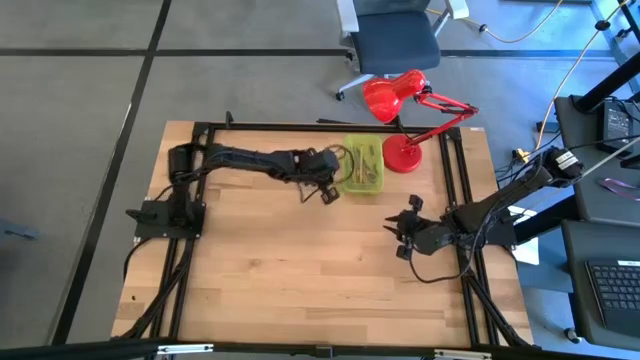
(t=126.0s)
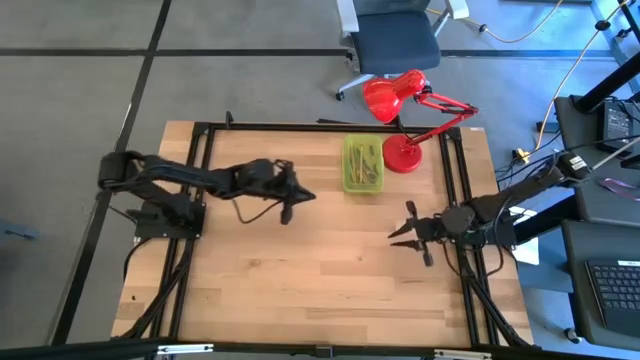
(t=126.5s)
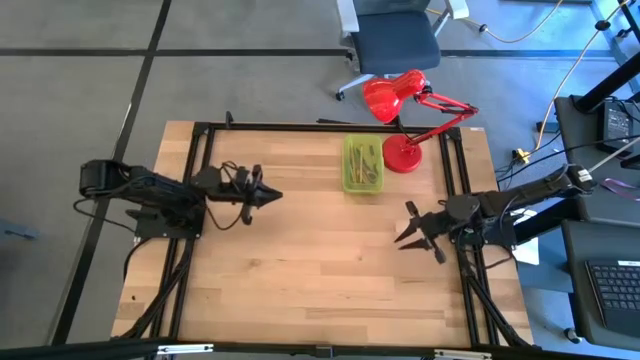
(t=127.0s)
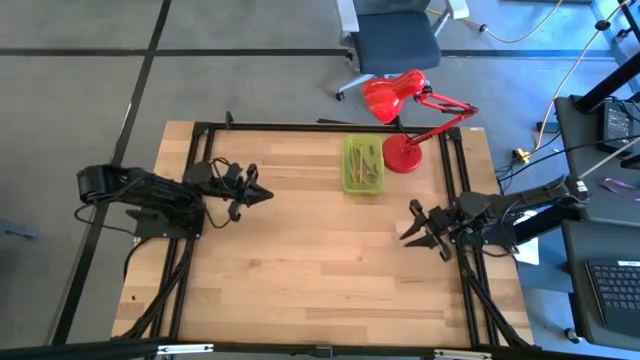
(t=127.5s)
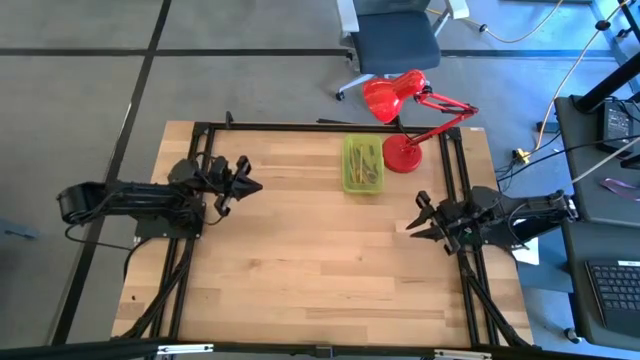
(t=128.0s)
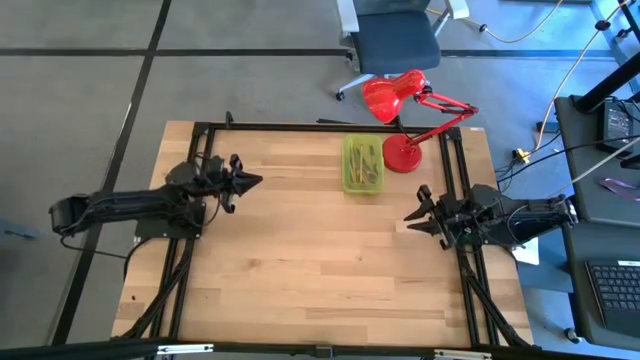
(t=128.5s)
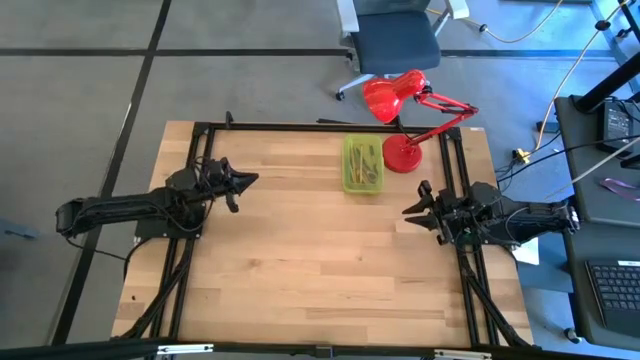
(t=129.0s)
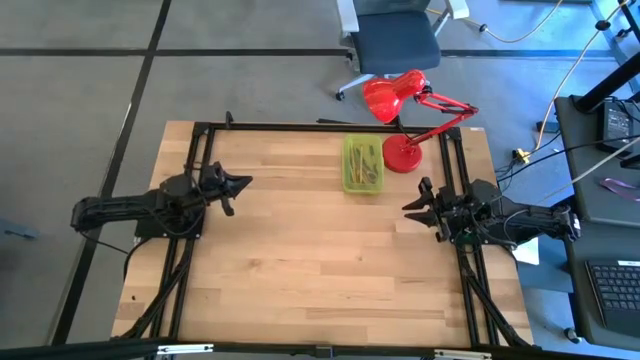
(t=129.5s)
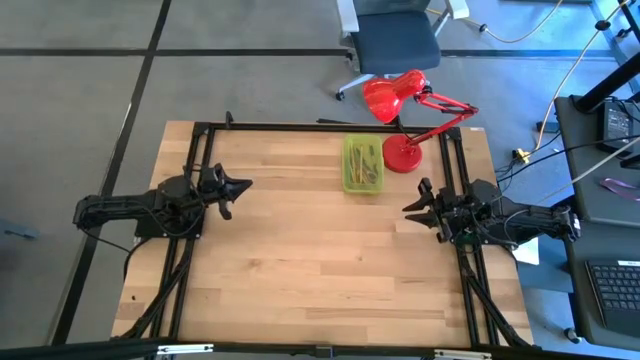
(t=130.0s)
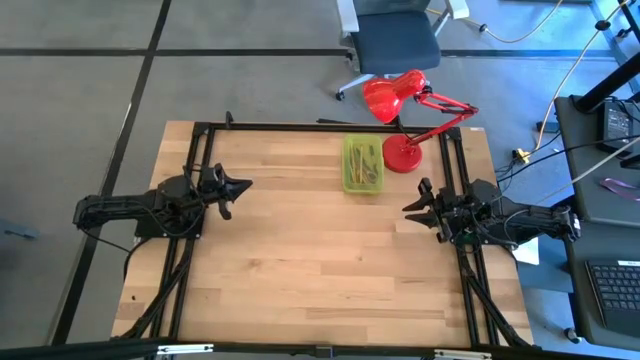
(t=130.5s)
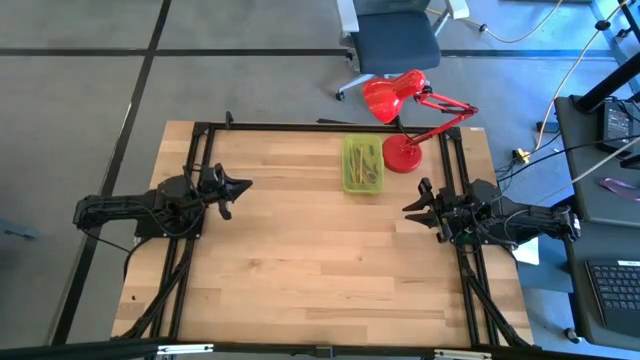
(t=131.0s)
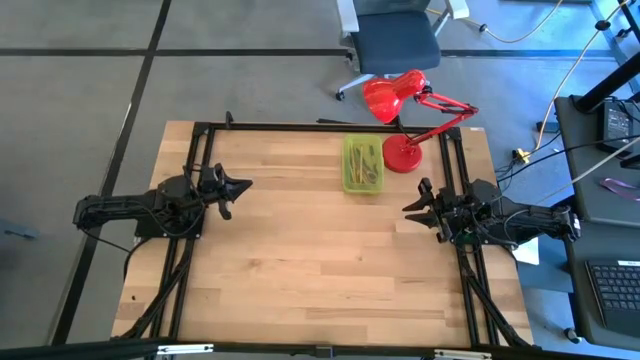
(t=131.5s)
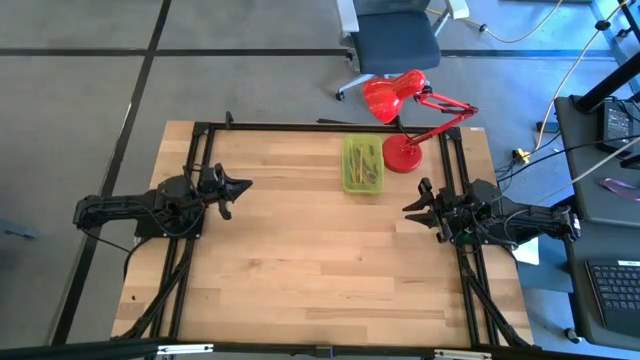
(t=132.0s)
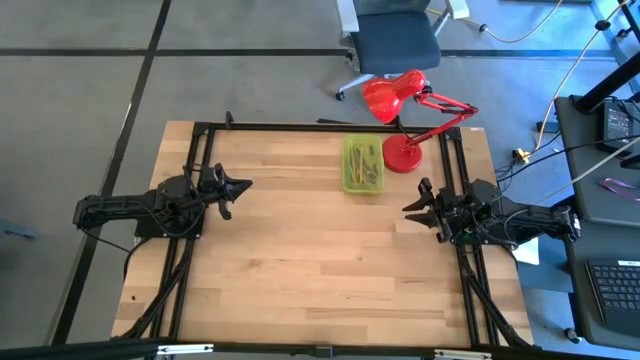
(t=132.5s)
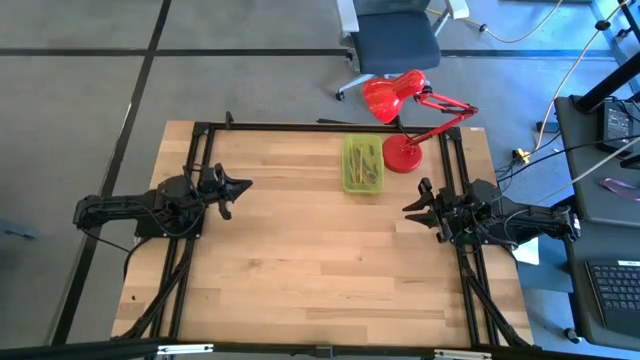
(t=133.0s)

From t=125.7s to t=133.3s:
Task: Pick & place school supplies into a supply box
Return to Home Position

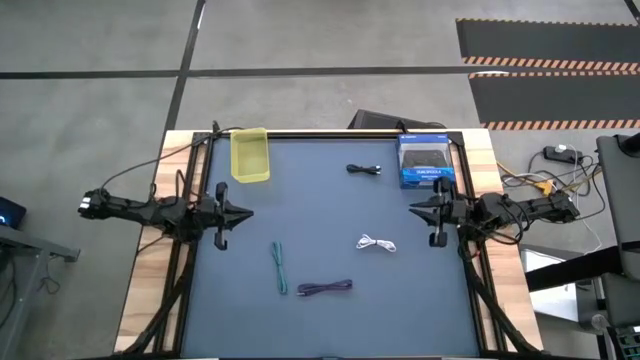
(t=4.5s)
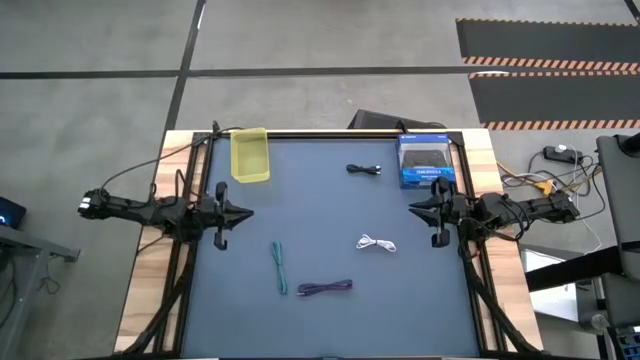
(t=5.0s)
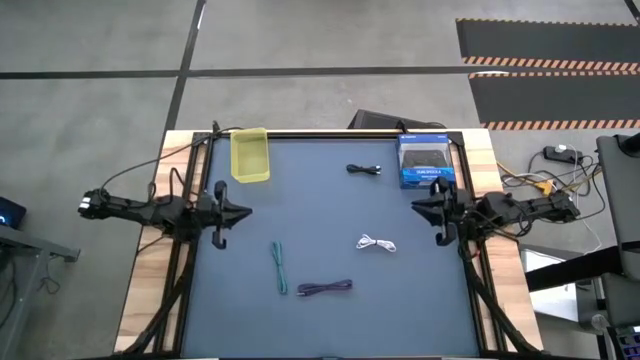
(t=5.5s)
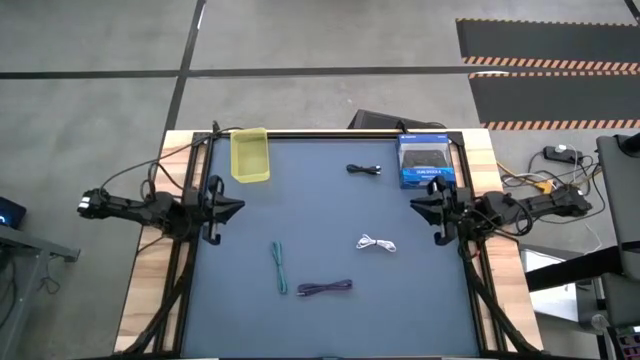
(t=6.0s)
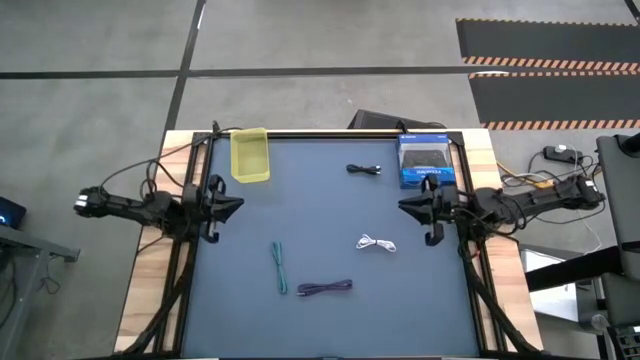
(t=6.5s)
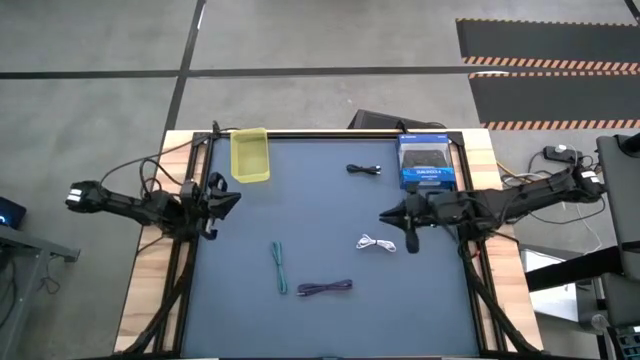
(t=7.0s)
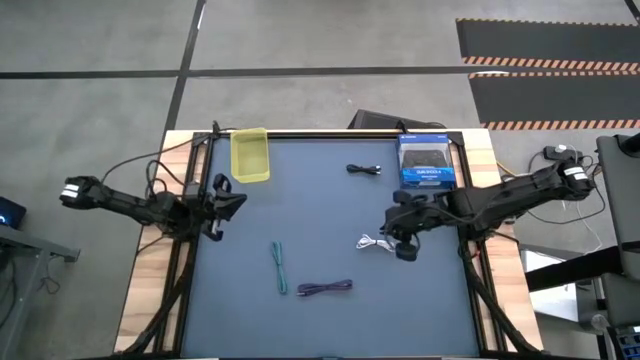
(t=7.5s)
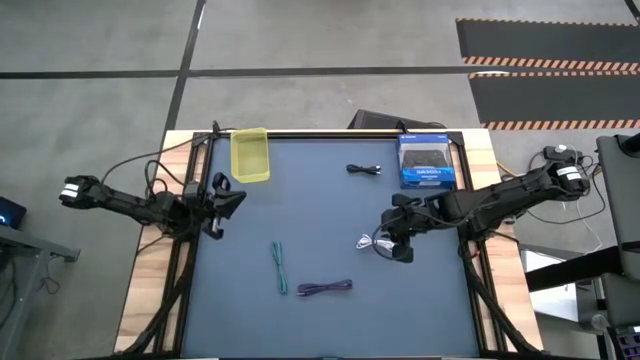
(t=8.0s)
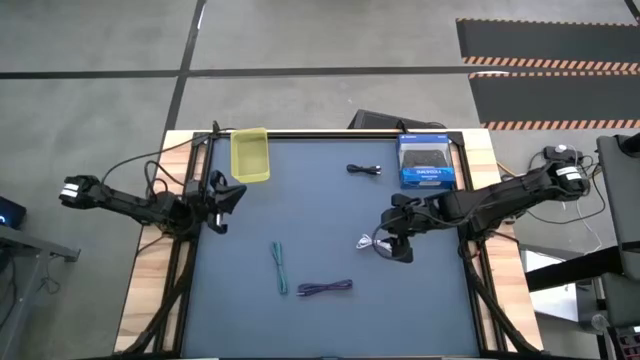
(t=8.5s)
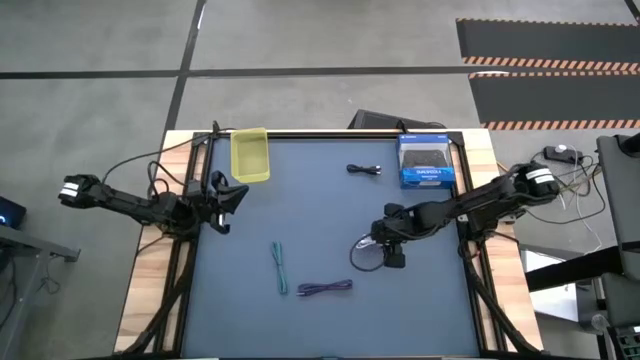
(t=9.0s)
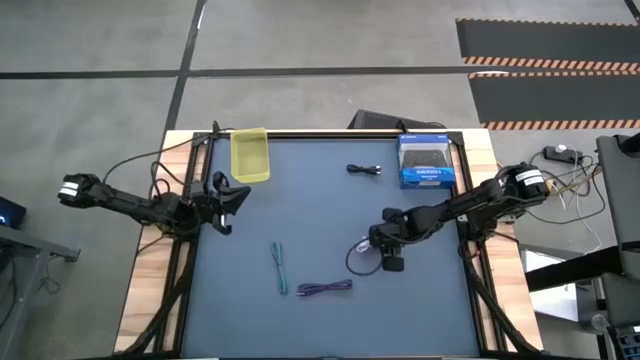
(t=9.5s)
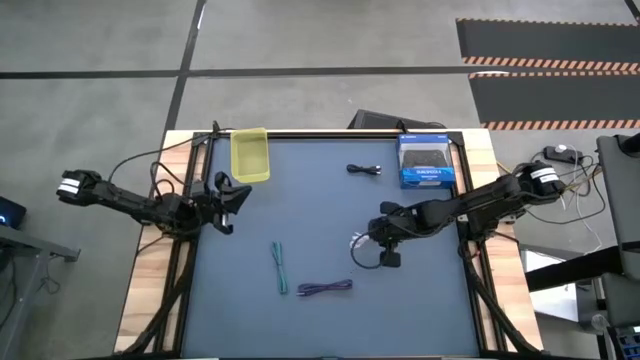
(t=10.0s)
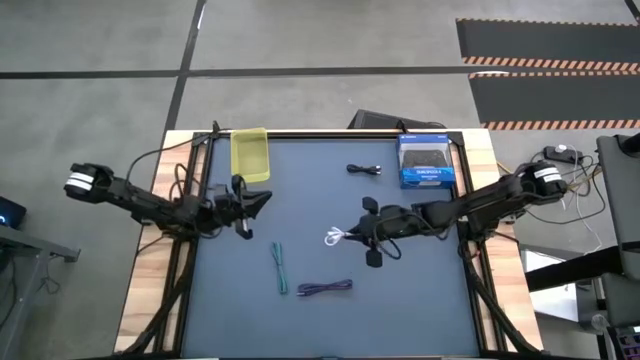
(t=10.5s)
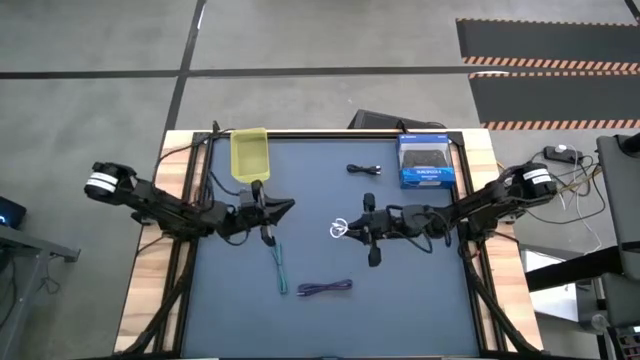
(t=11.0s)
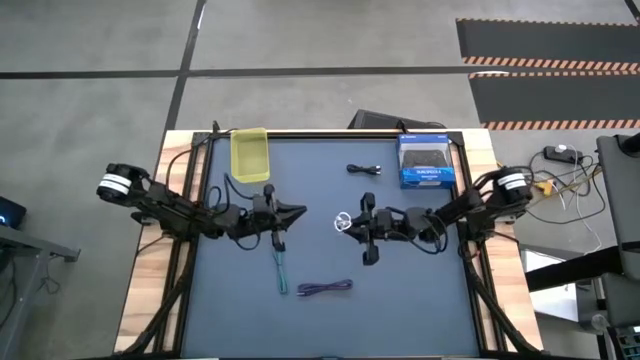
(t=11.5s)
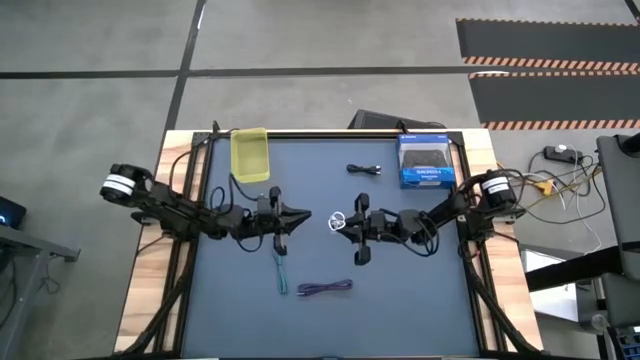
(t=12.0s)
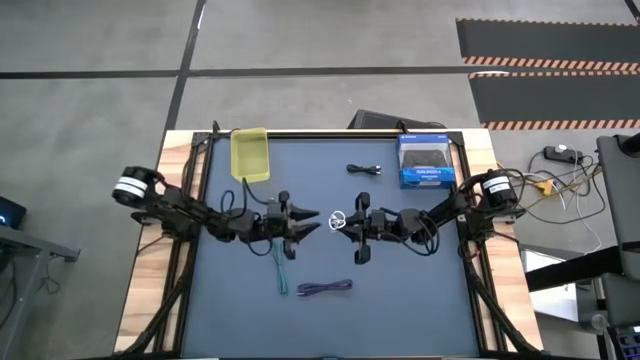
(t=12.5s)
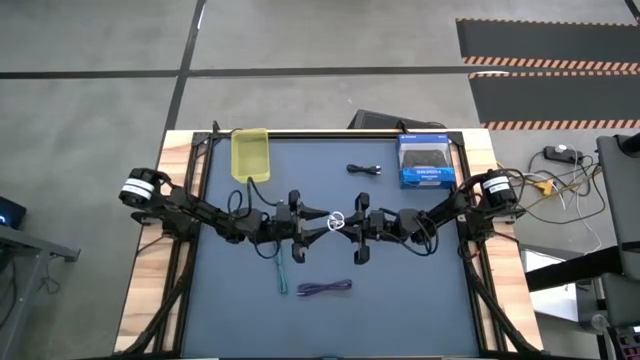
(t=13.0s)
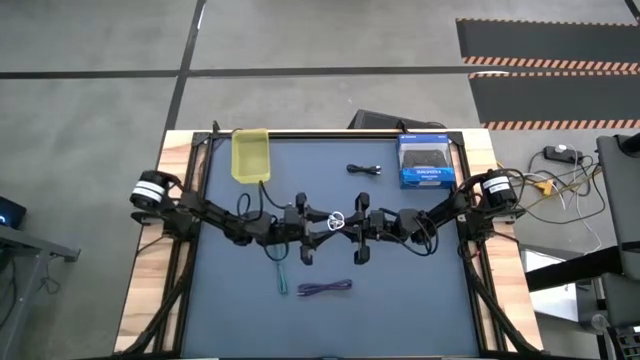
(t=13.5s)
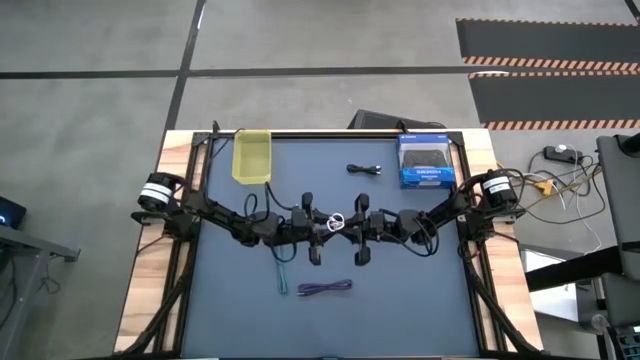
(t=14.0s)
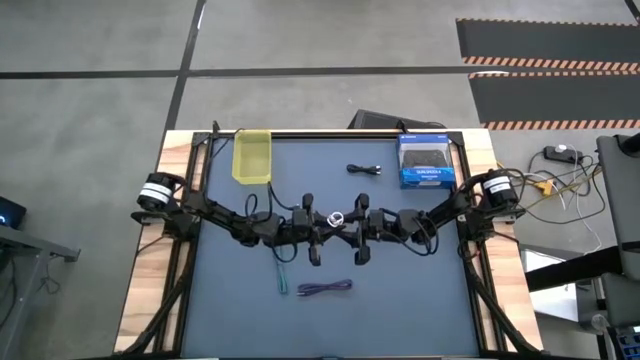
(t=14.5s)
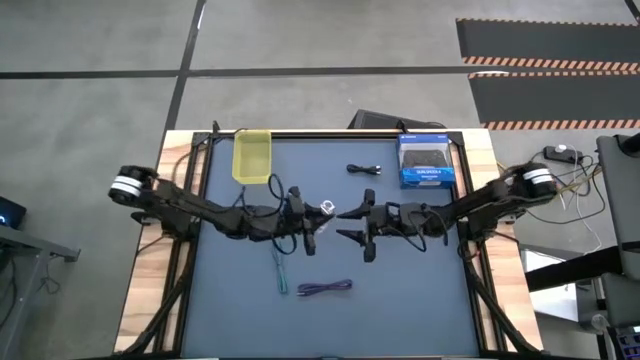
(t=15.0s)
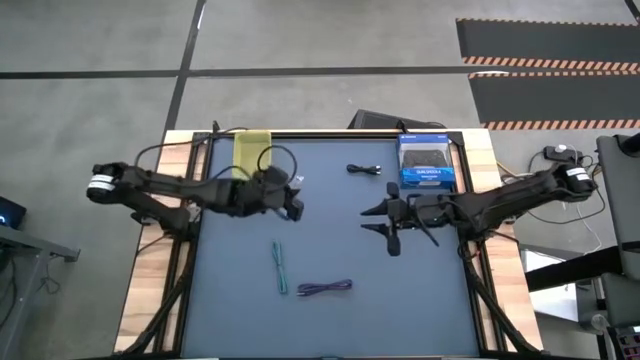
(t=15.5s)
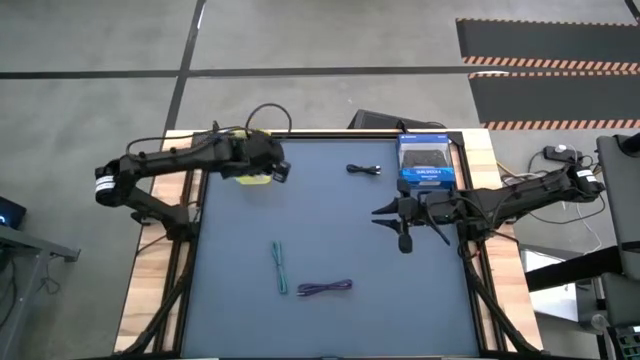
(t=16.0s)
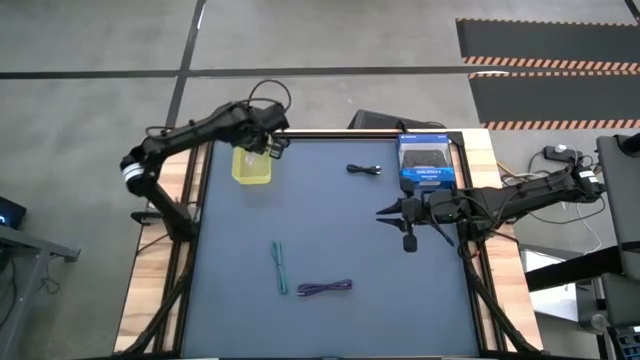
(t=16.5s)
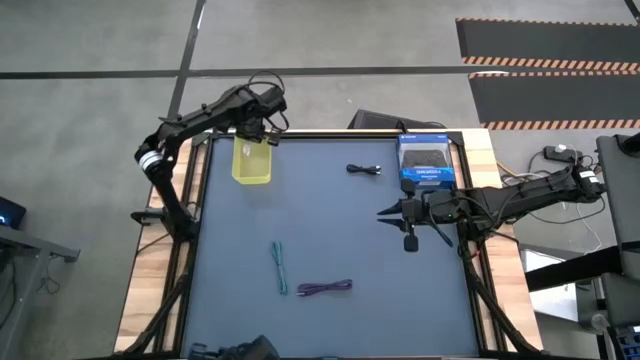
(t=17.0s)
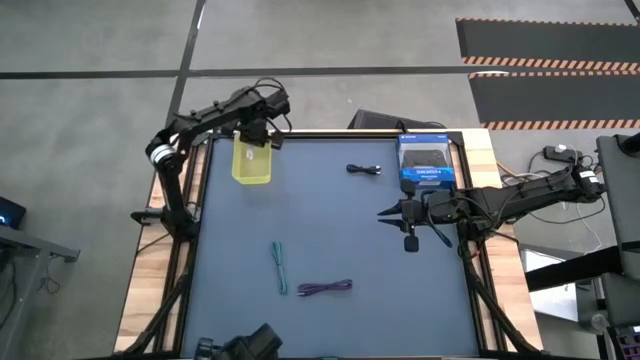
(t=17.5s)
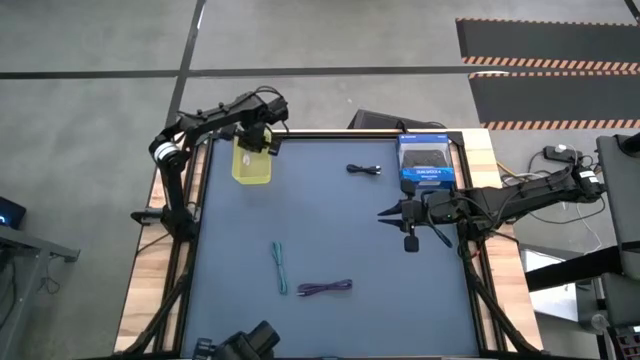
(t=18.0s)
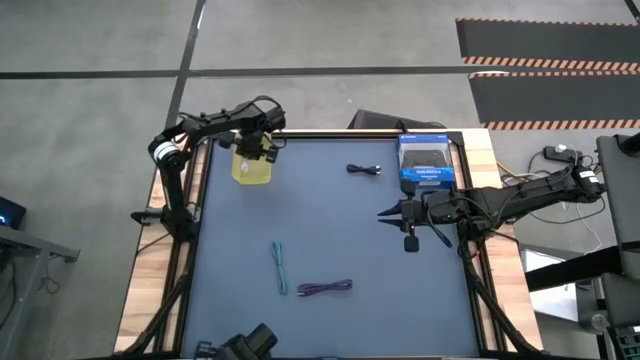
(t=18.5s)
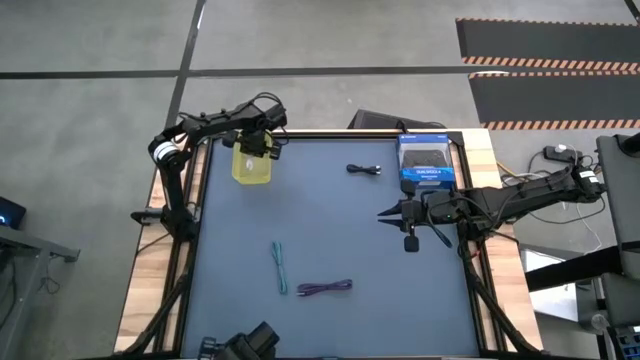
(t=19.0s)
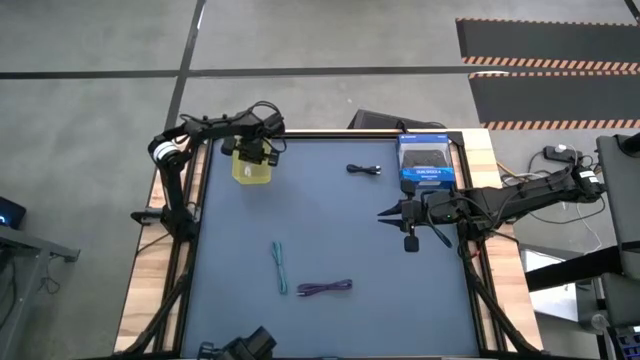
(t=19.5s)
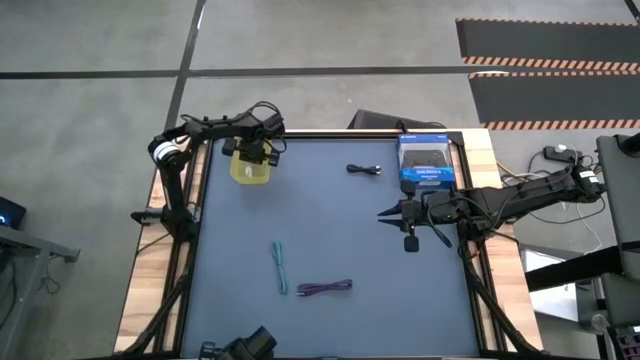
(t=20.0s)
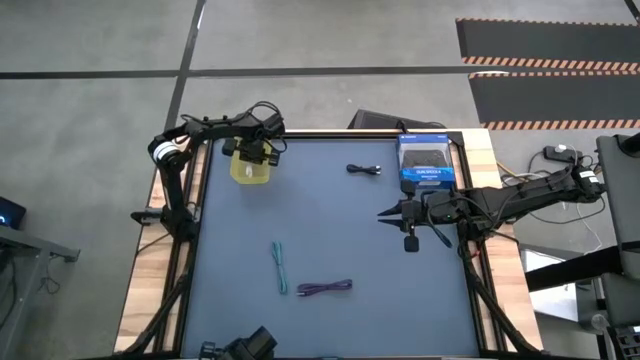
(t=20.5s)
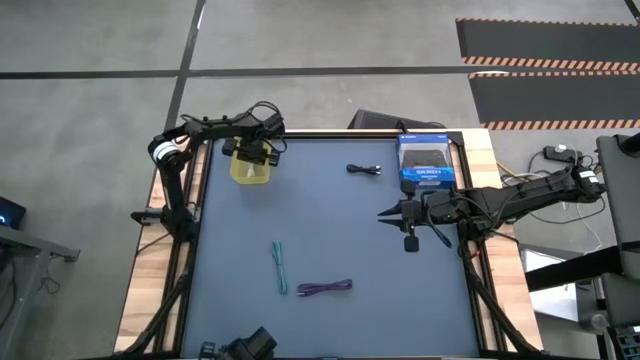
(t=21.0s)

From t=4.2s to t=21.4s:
Task: Pick and place USB-C Cables
Put the white charger cable into the yellow bin
